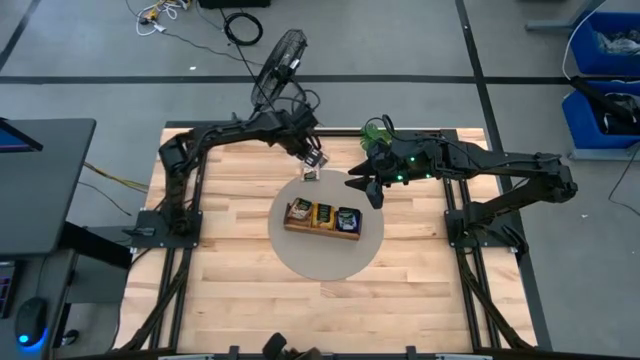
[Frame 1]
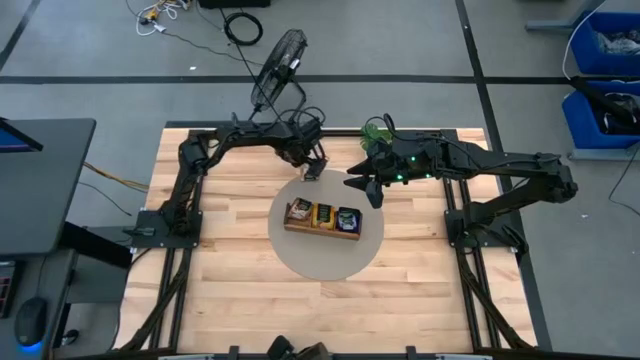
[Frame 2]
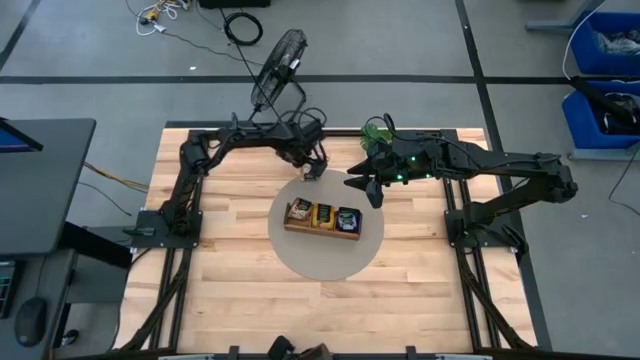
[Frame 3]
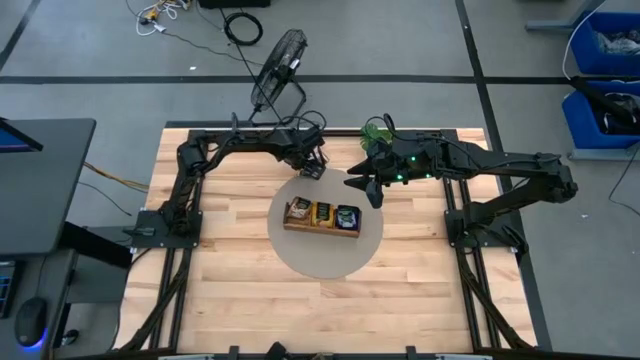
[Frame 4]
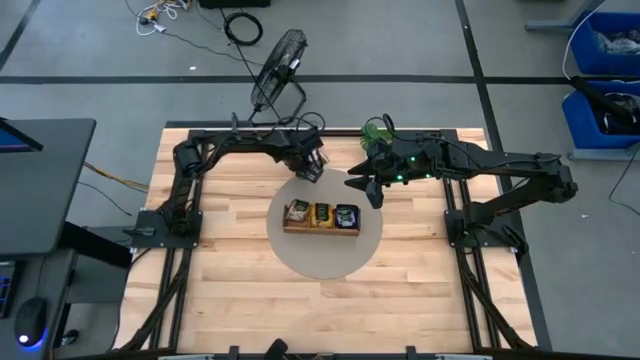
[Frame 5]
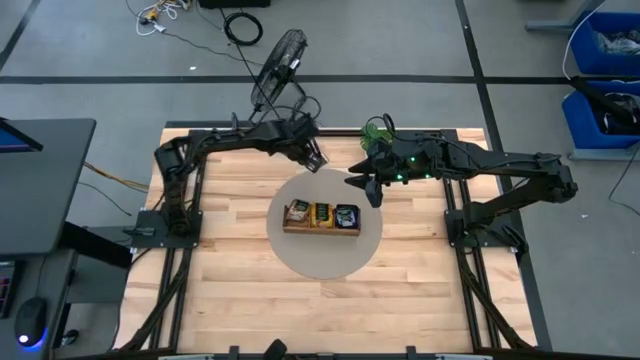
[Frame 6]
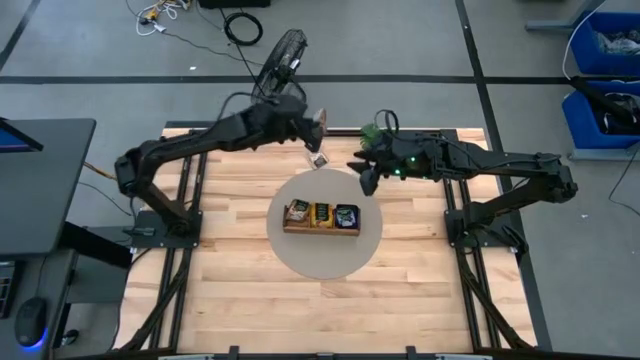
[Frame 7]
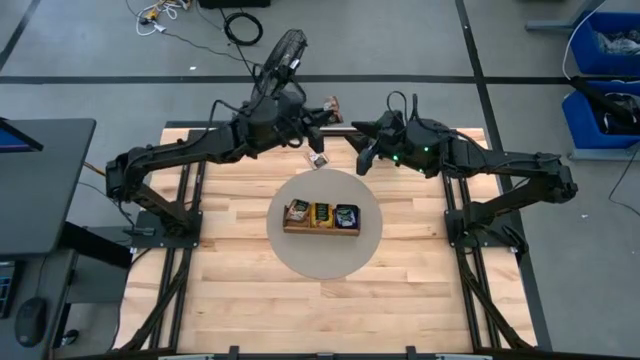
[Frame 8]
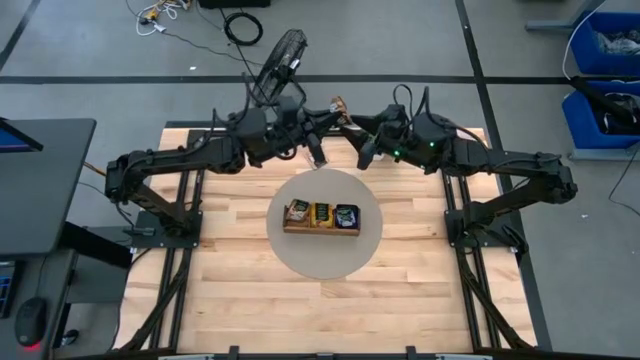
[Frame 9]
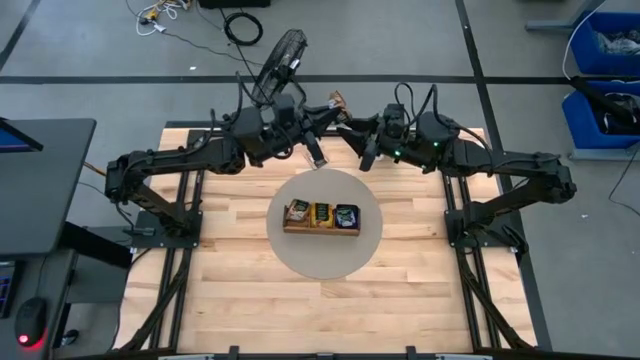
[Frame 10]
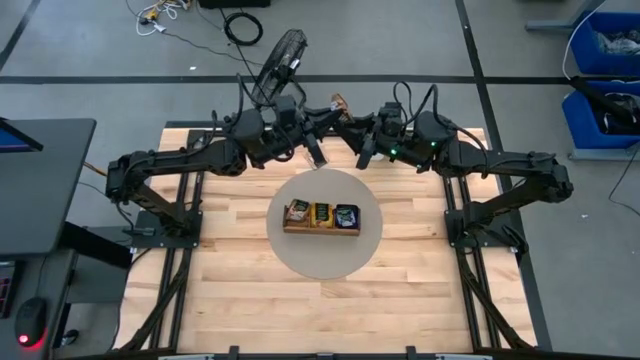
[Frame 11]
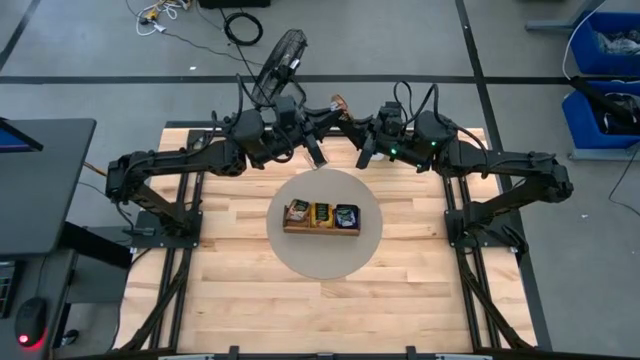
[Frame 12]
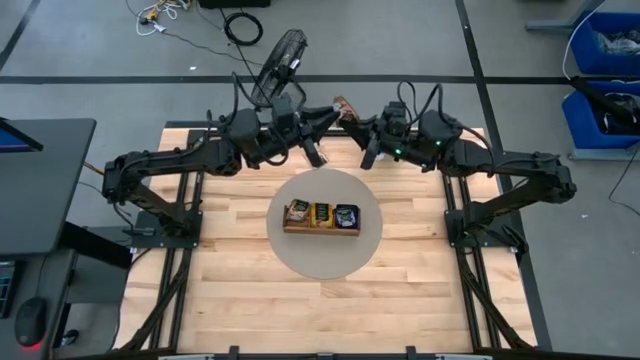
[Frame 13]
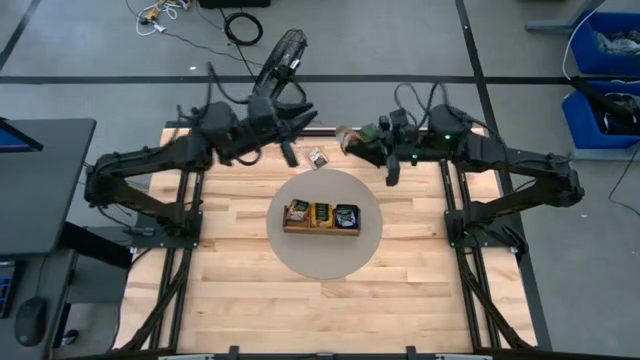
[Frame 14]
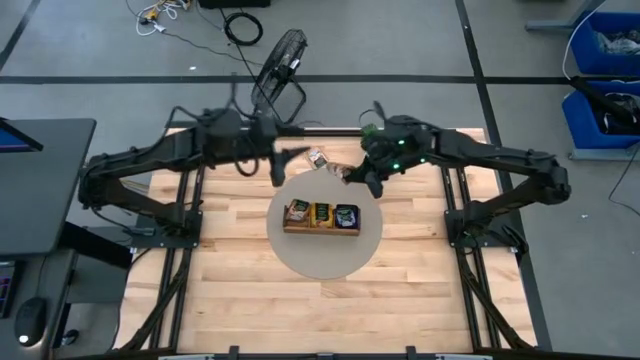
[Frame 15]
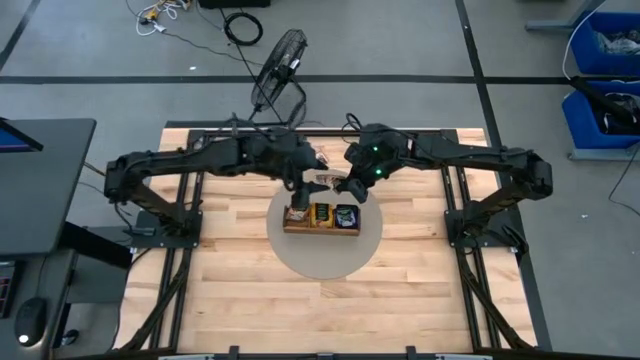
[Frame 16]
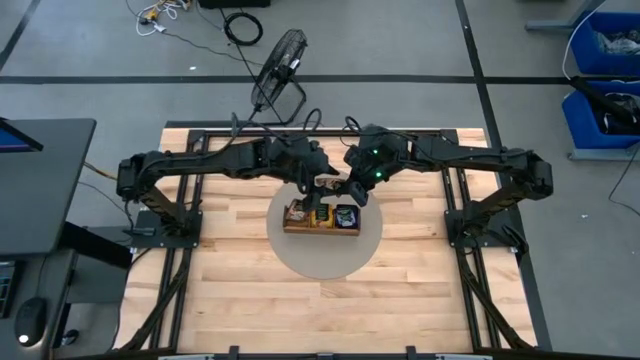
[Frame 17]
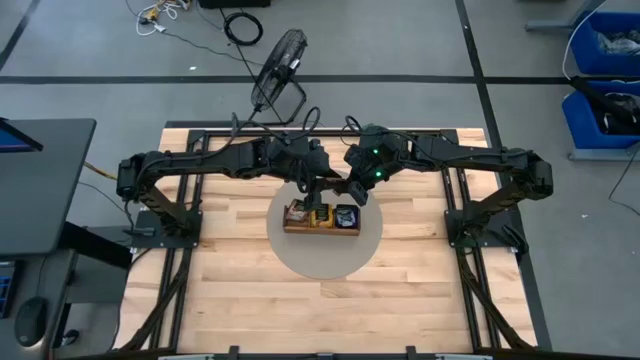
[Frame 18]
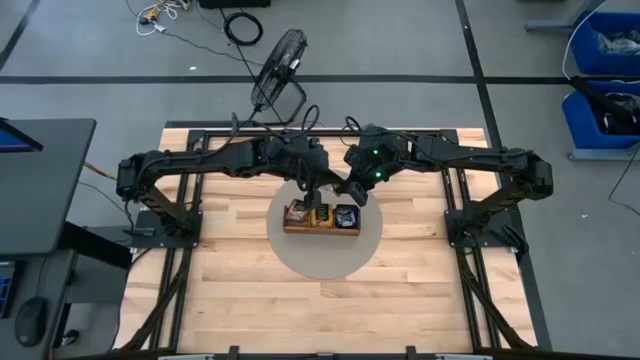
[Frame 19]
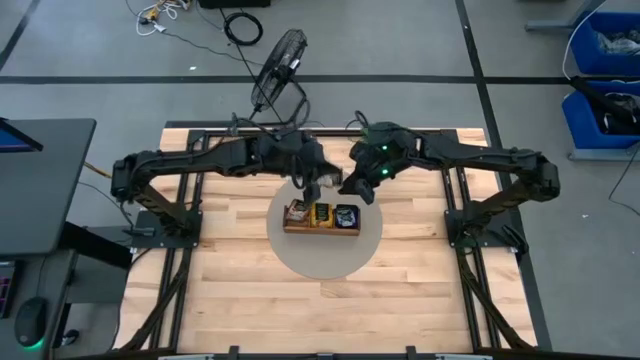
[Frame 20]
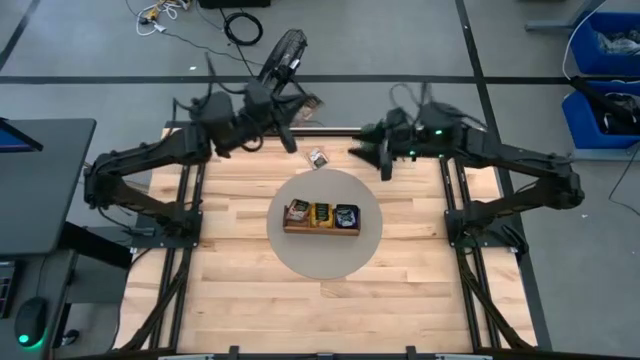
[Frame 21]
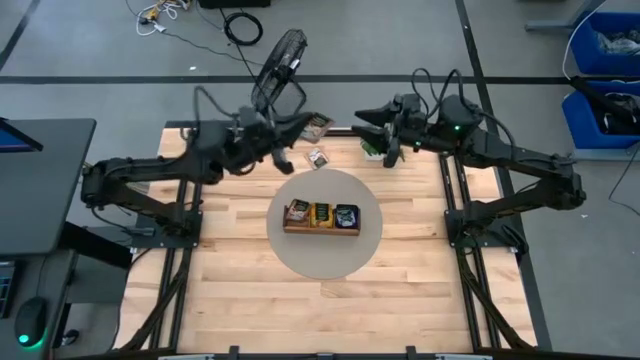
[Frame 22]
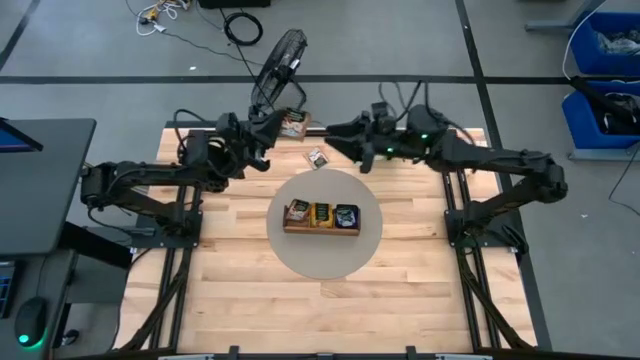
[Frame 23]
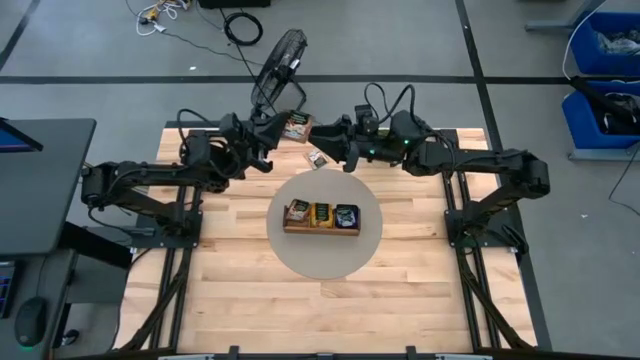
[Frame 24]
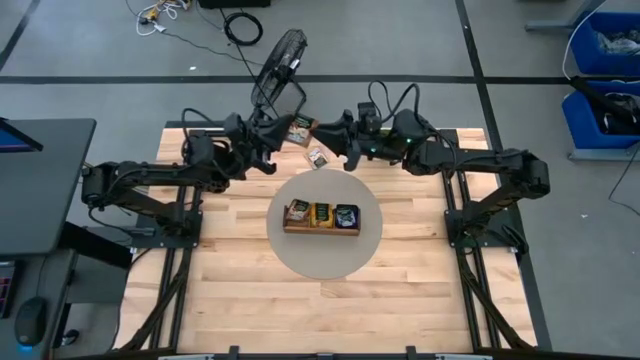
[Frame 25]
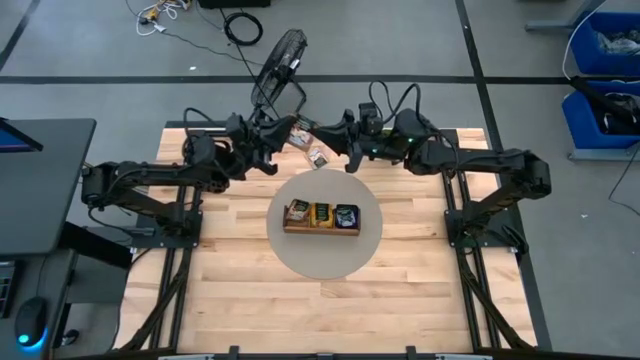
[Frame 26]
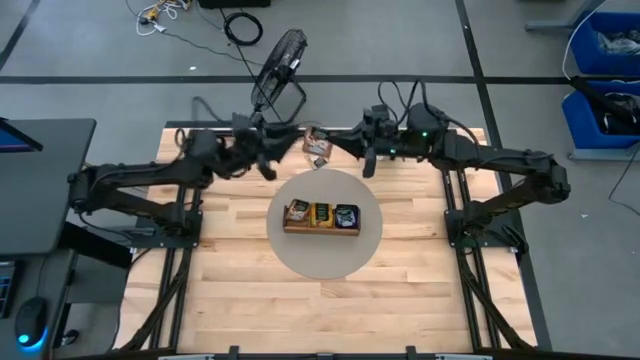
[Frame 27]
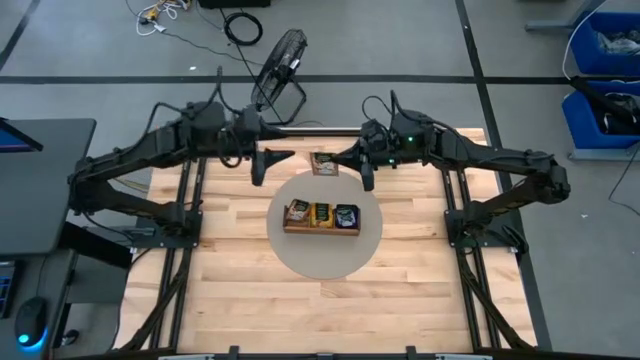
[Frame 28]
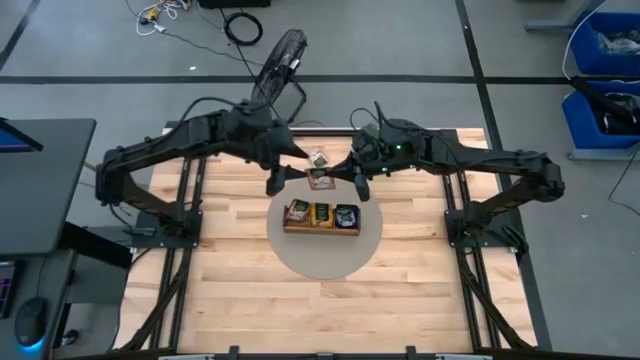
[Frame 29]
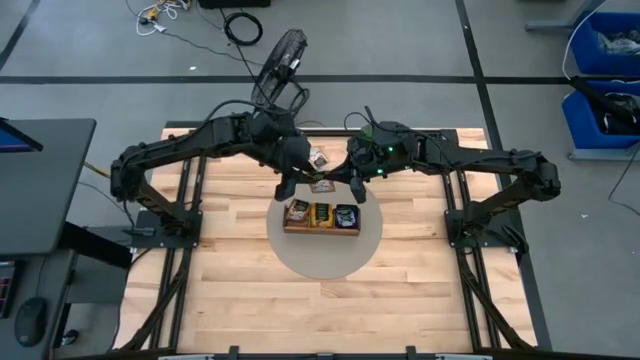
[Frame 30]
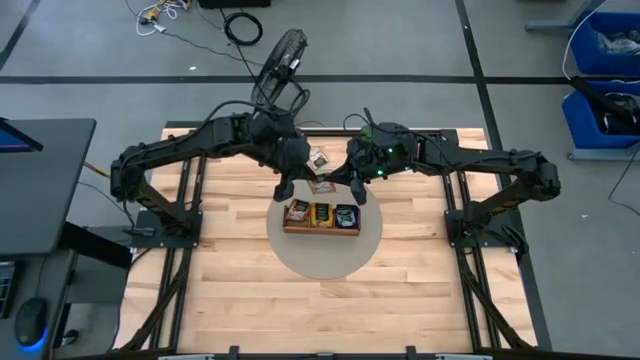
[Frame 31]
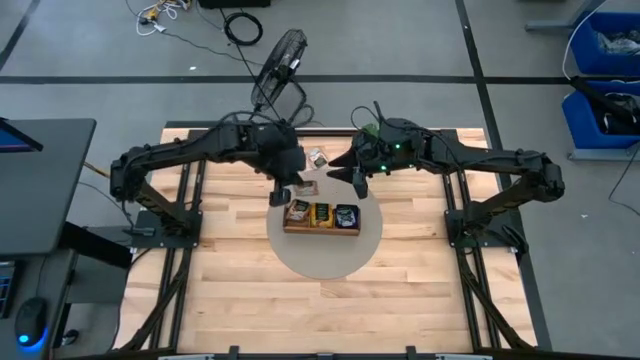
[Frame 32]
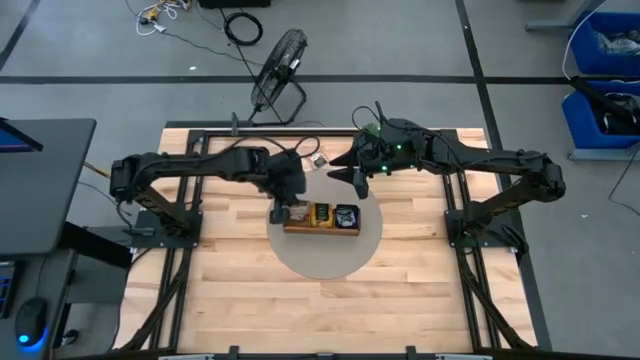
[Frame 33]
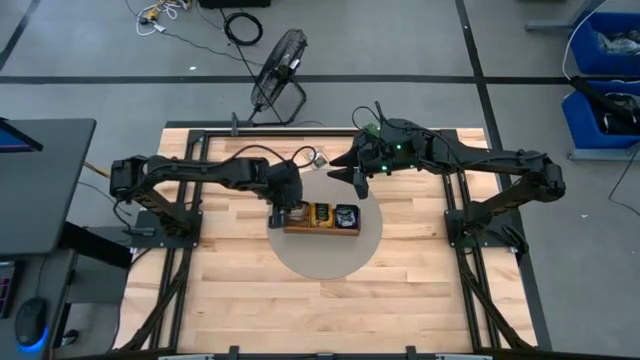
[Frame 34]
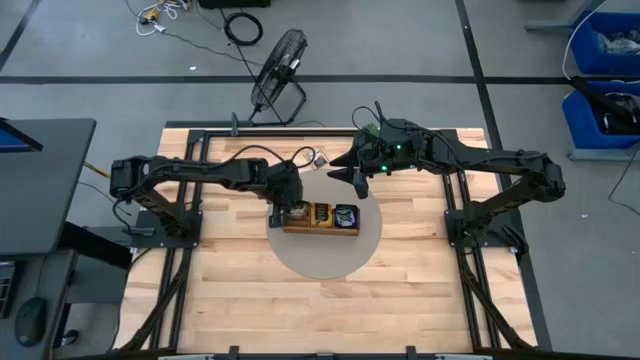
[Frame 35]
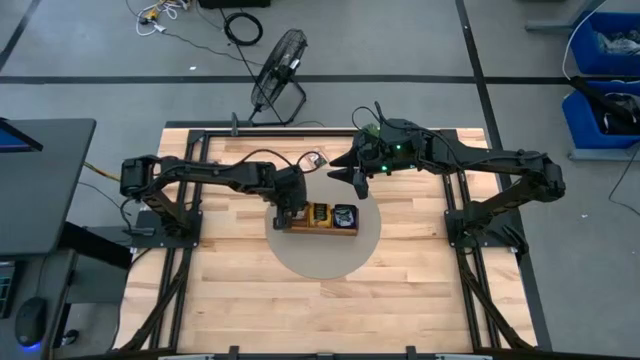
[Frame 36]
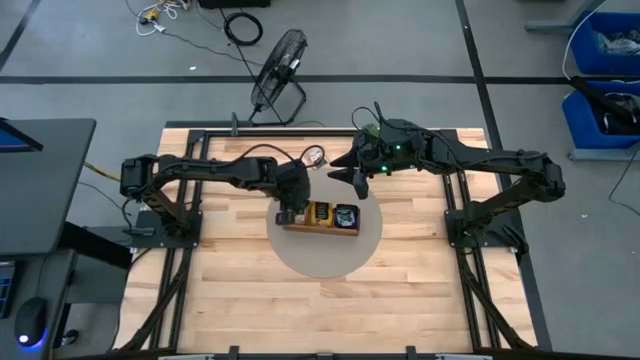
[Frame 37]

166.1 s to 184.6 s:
Task: Pick & Place Tea
Put the brown tea bag into the left section of the wooden organizer

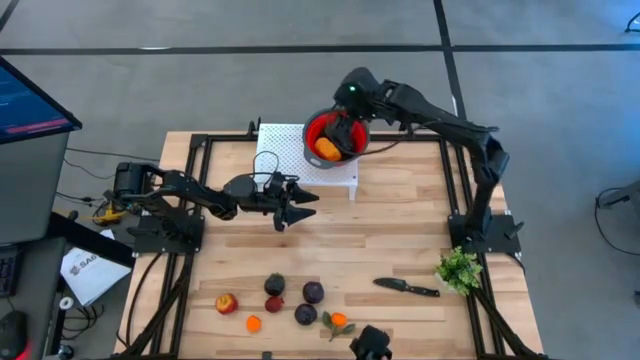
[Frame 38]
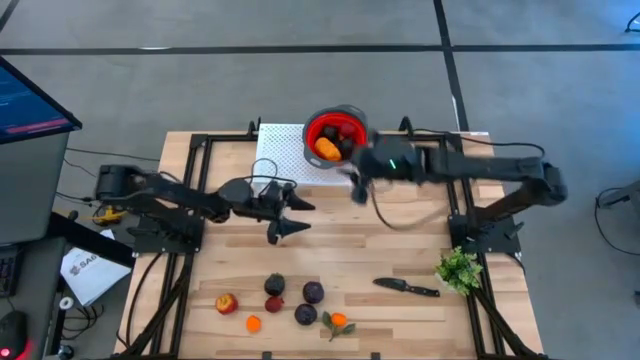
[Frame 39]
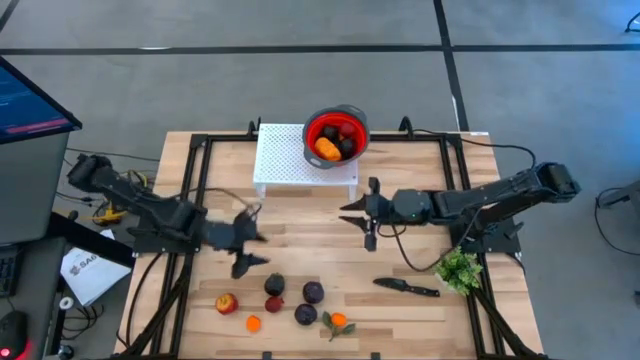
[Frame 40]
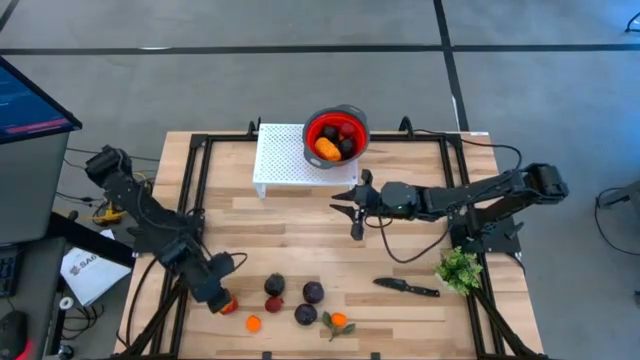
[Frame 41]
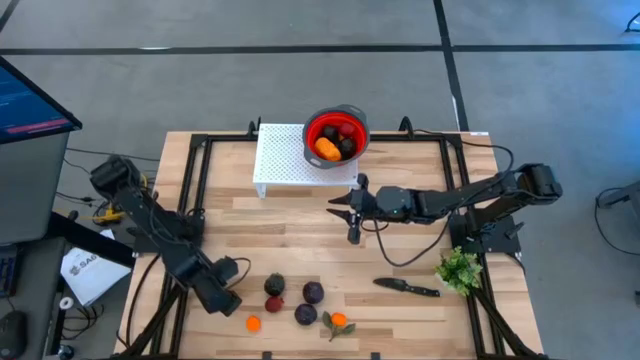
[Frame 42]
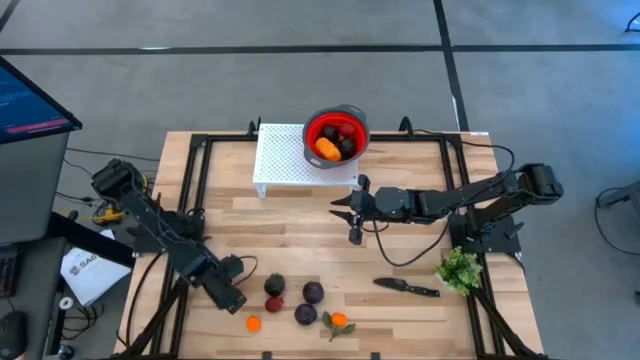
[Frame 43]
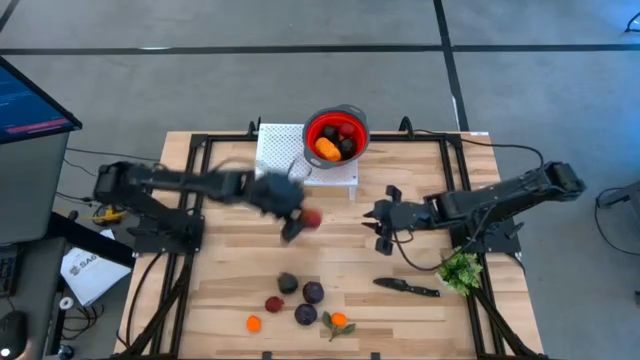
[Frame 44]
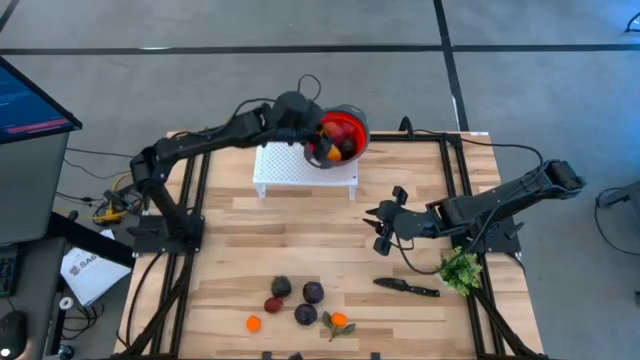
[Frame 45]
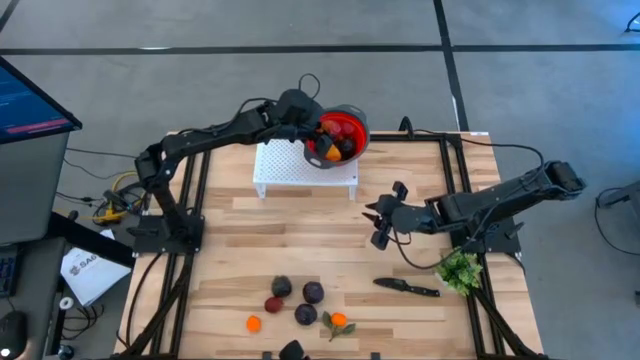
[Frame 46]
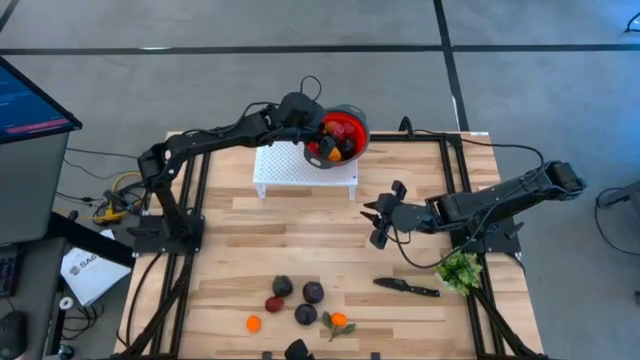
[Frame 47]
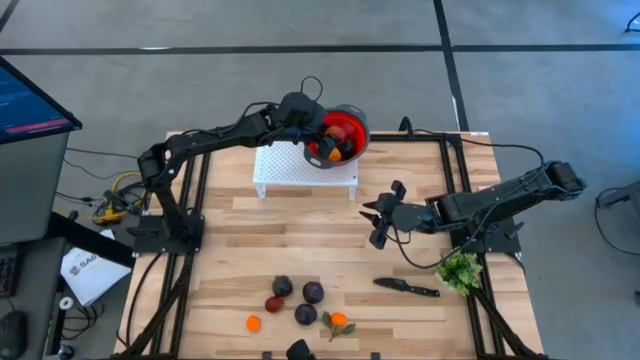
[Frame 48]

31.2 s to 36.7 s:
Task: Pick & Place Fruit
Put the apple into the red strainer on the shelf
